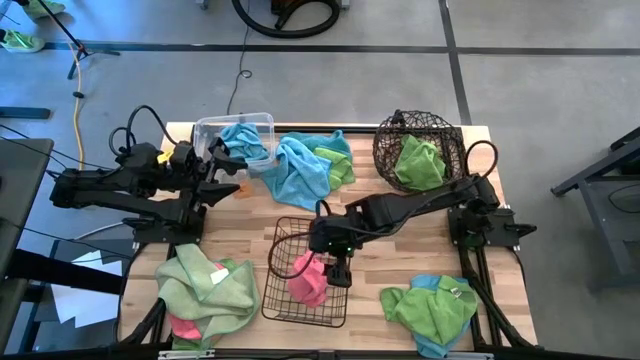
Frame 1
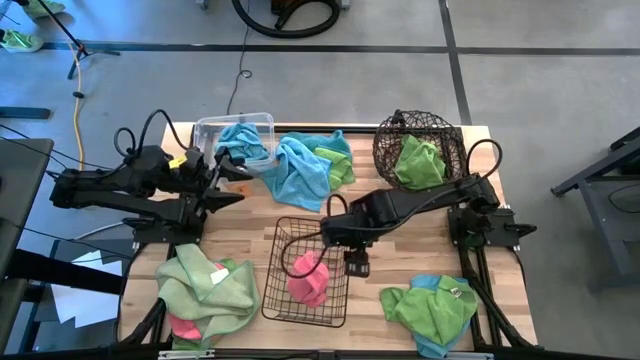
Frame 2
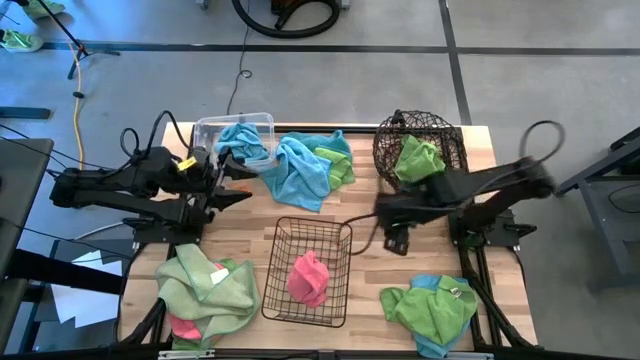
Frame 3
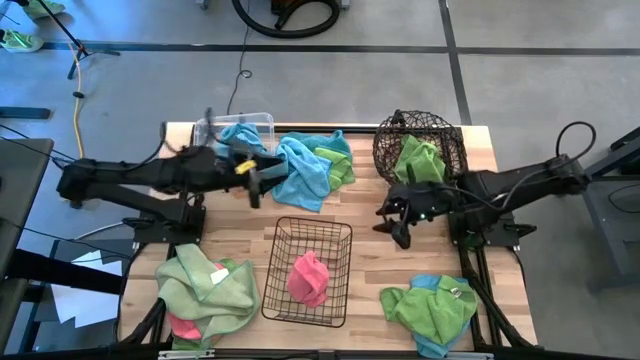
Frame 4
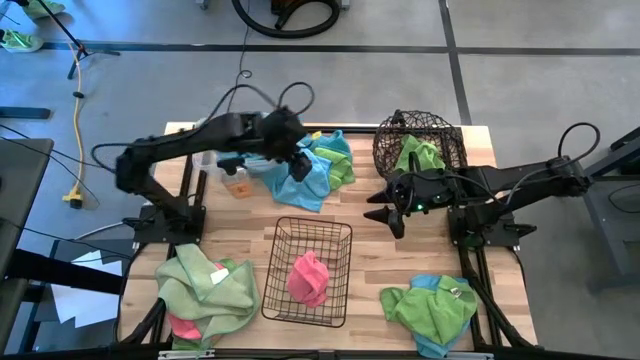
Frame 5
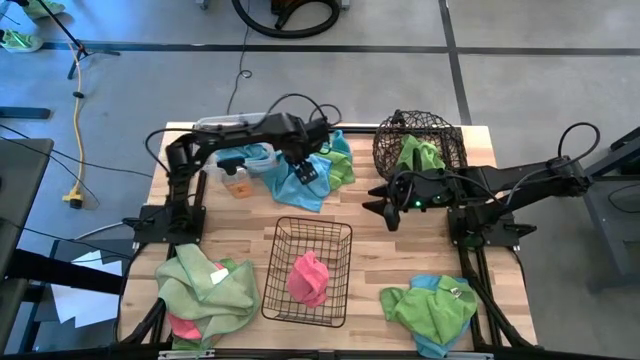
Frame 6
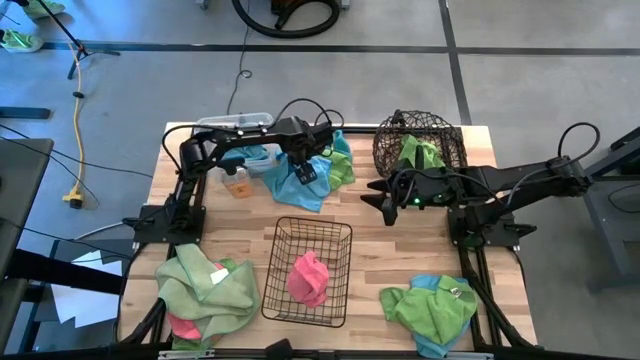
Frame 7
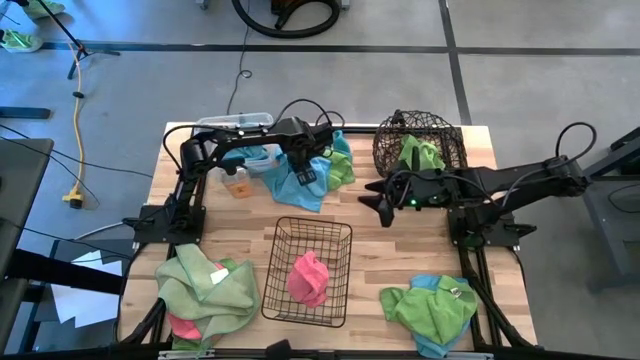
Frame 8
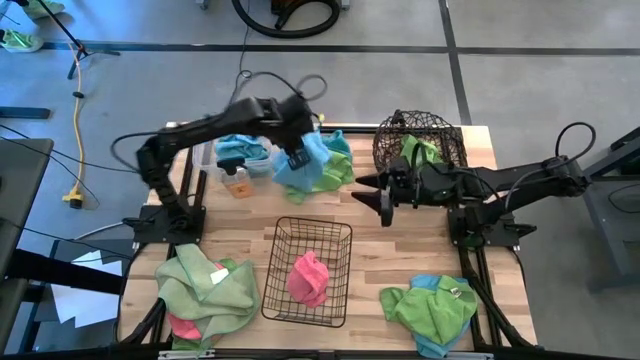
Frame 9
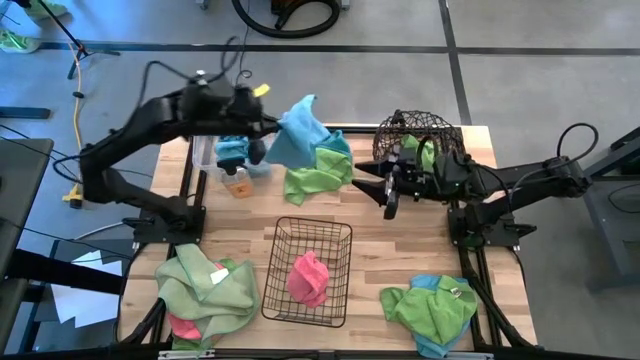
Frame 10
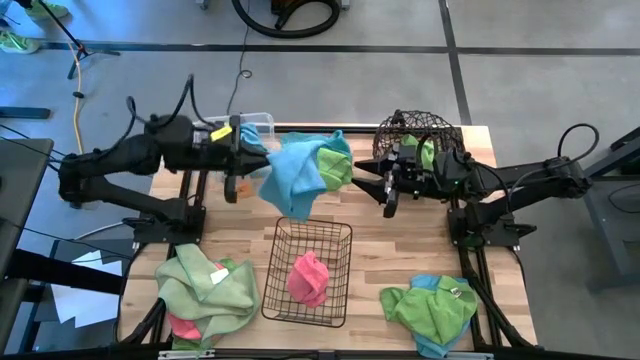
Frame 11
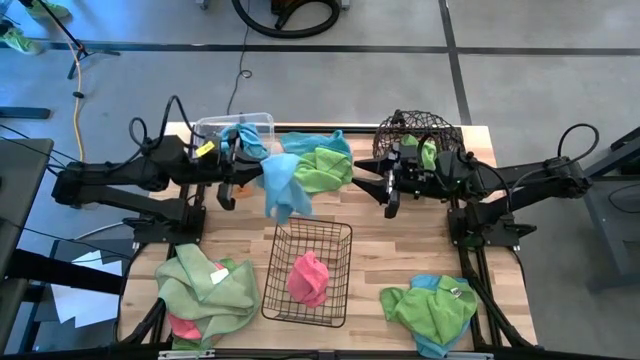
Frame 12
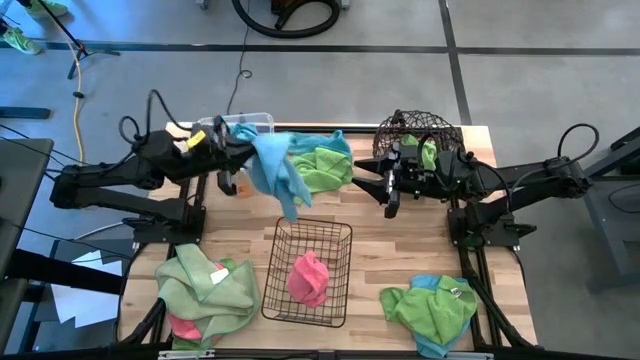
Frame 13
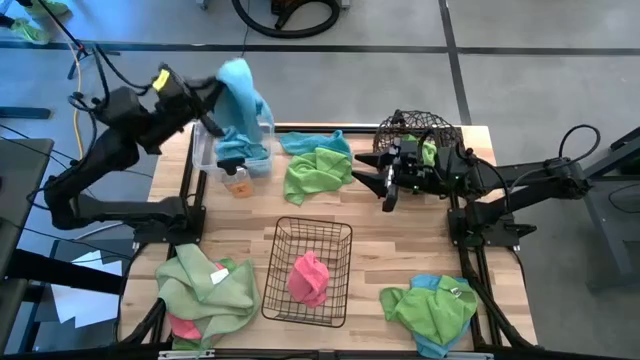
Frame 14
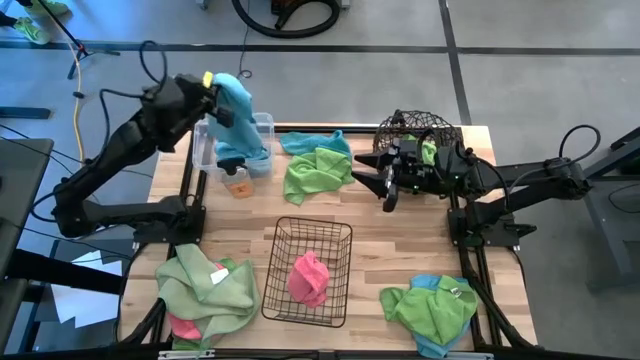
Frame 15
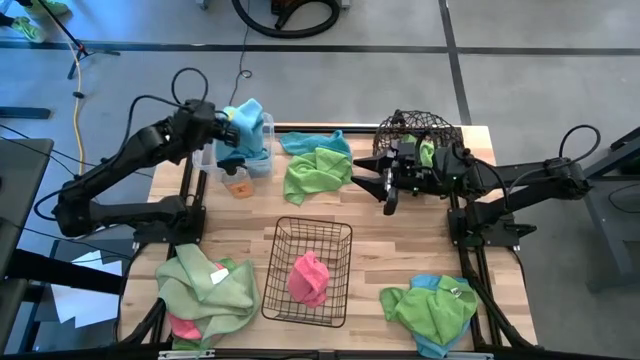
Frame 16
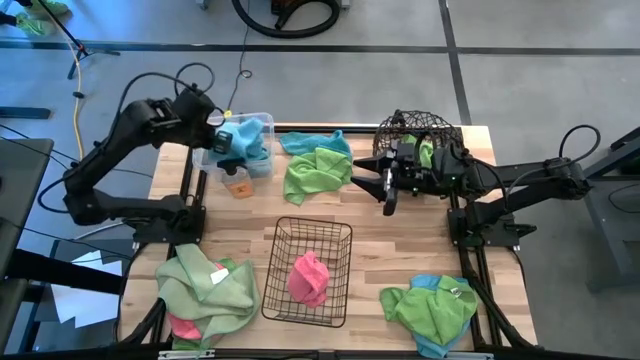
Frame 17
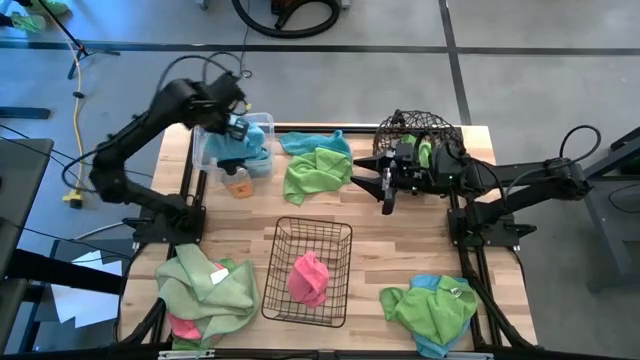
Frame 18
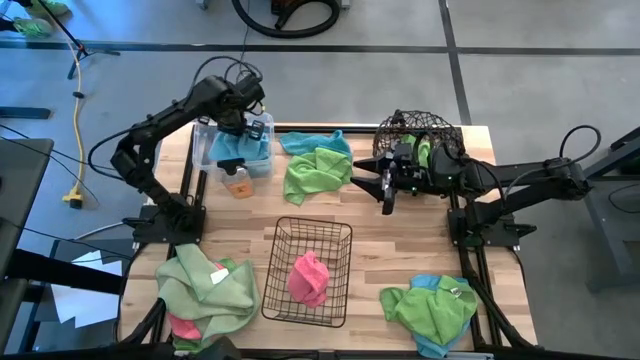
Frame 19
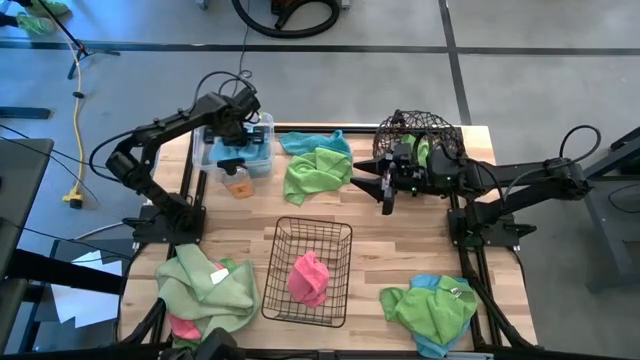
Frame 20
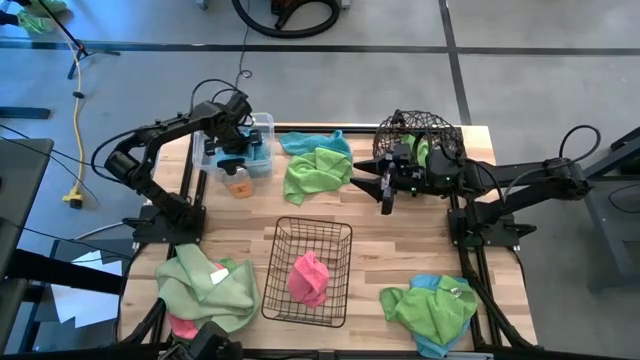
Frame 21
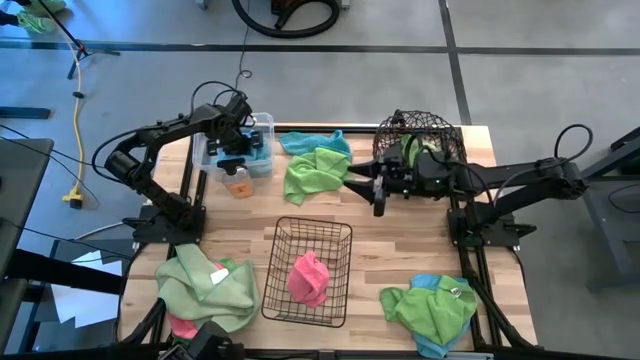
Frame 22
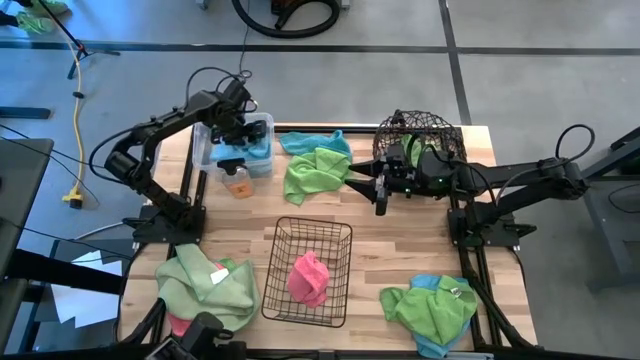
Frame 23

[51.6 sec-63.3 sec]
Task: Sort microfiber towel by color & place in baskets
Put the blue microfiber towel into the transparent bin

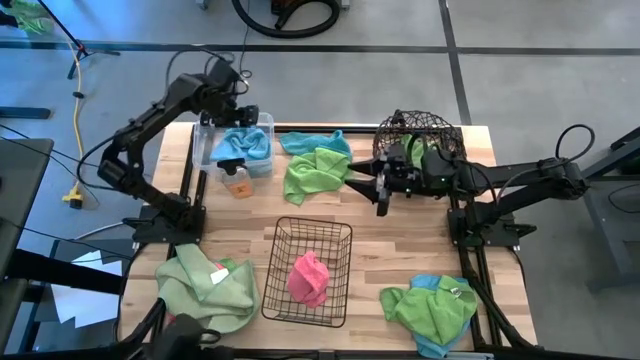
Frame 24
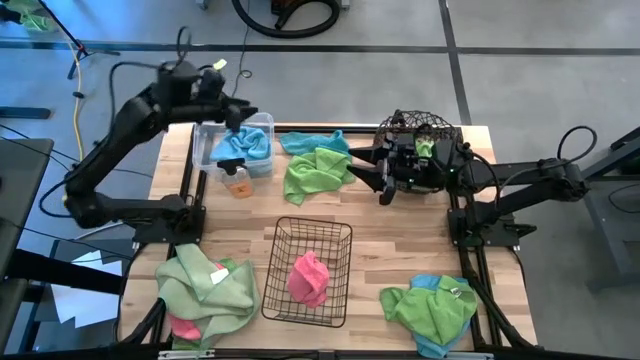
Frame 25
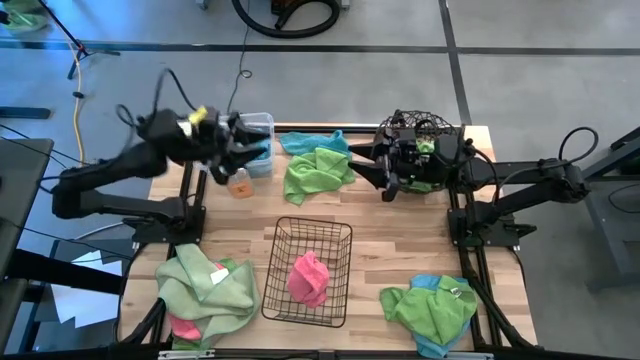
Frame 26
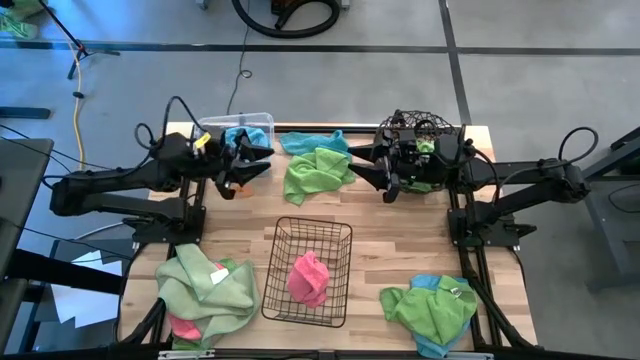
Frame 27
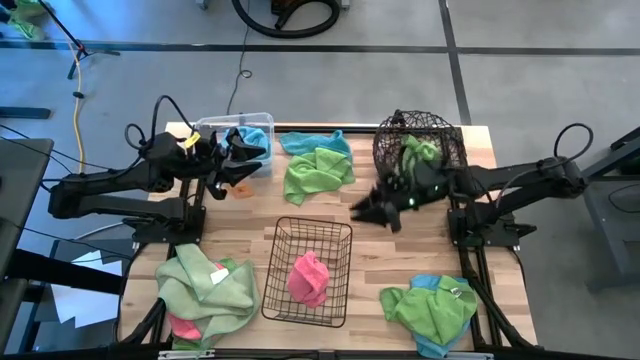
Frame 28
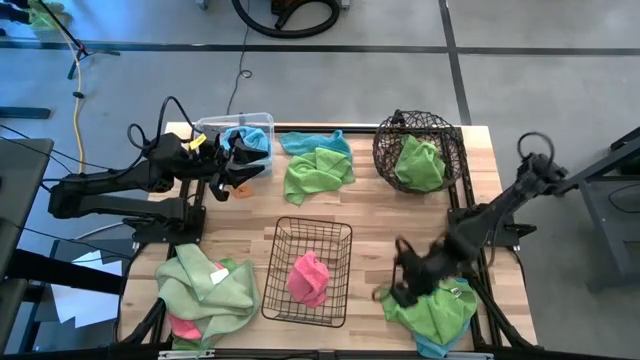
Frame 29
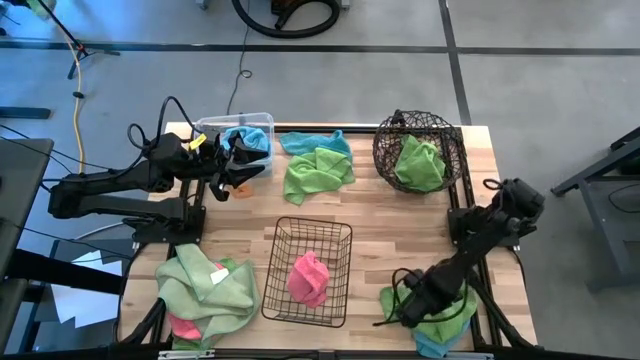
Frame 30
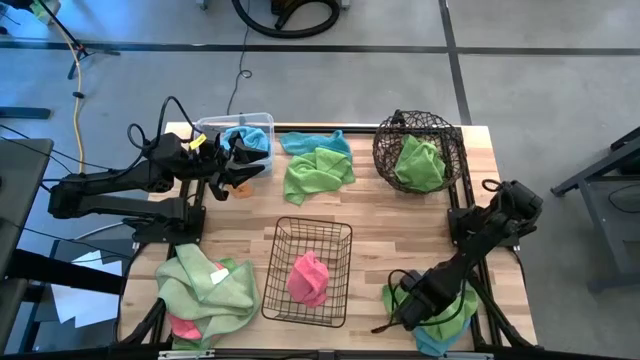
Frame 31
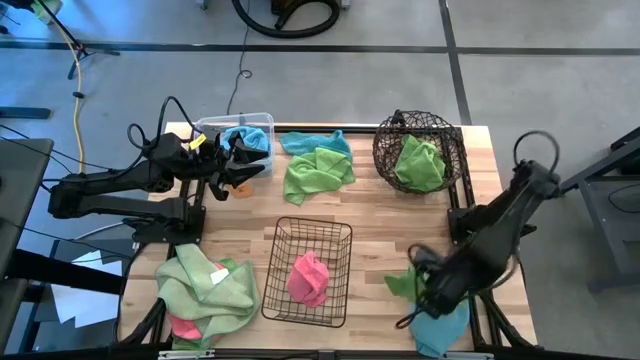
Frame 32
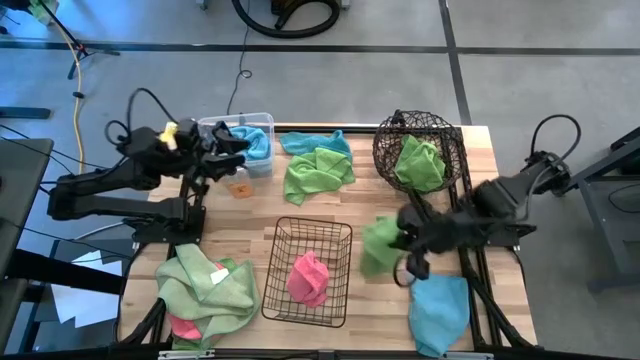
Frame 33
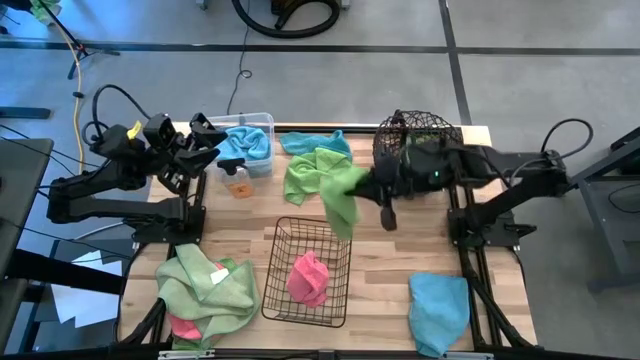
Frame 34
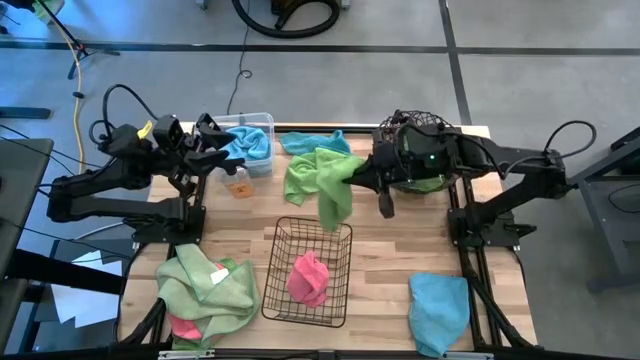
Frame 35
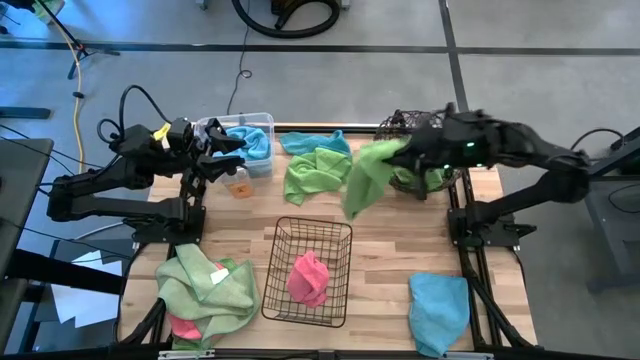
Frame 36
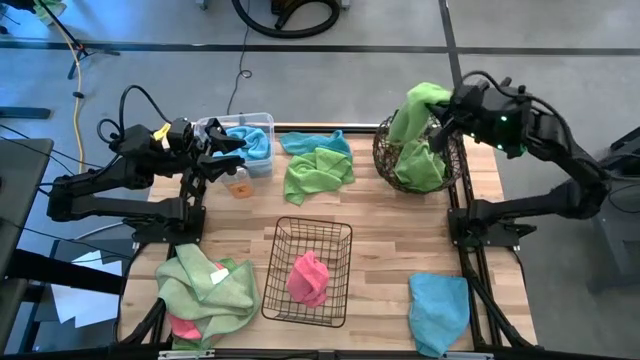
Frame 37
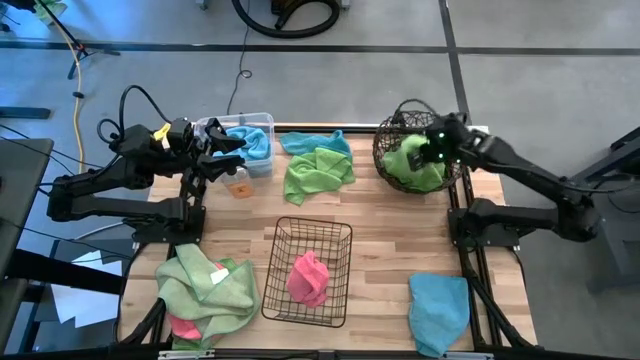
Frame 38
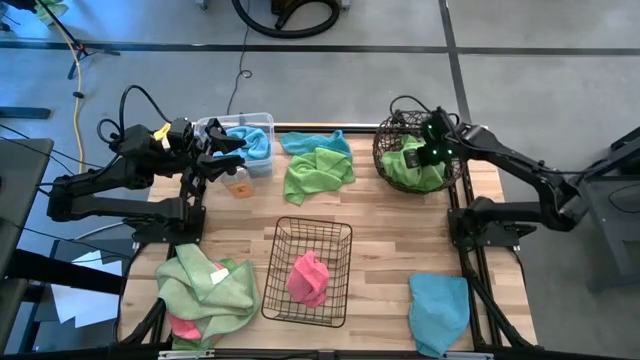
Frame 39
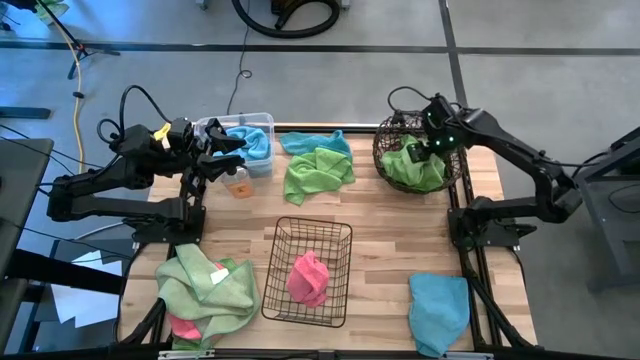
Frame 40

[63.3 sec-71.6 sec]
Put the green microfiber towel into the round black wire basket
